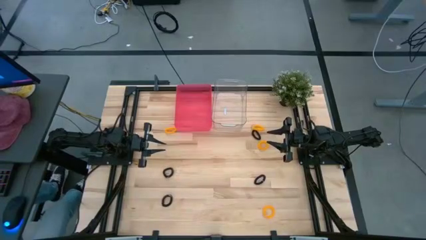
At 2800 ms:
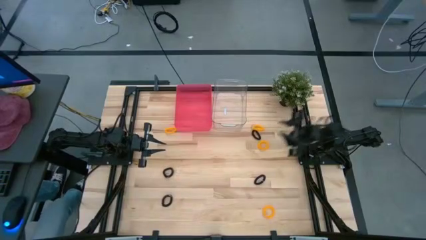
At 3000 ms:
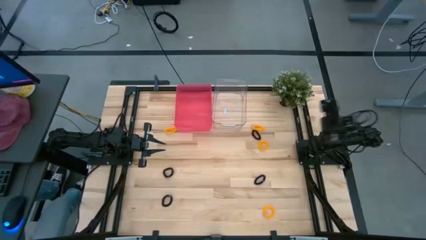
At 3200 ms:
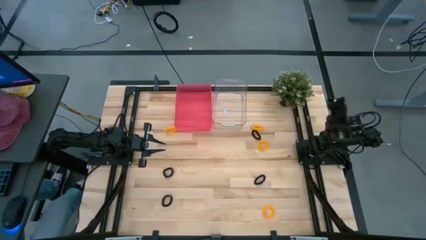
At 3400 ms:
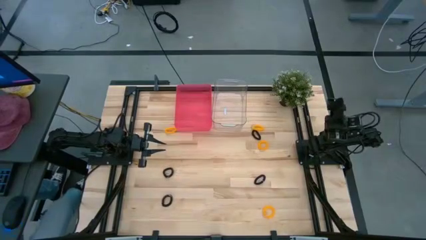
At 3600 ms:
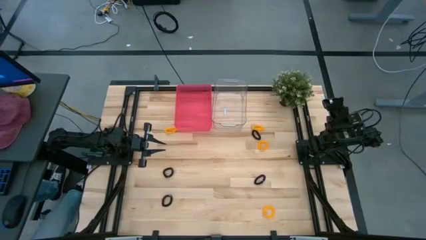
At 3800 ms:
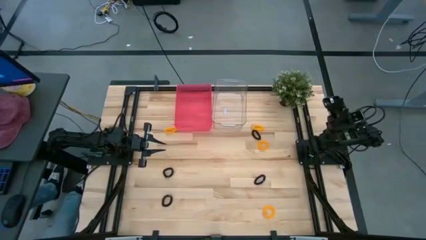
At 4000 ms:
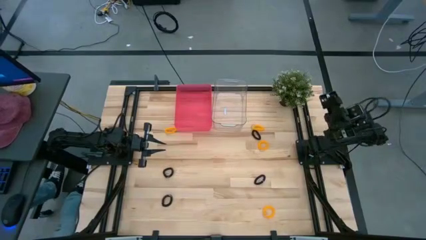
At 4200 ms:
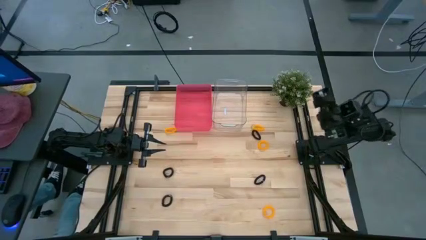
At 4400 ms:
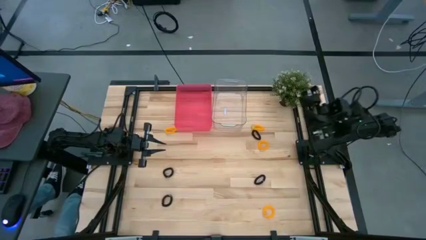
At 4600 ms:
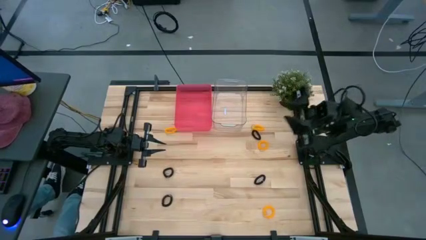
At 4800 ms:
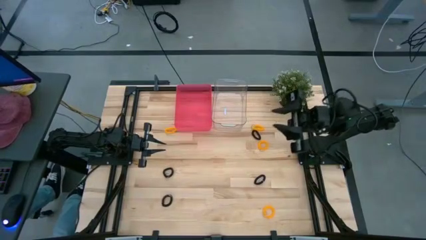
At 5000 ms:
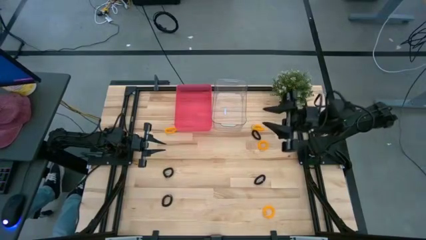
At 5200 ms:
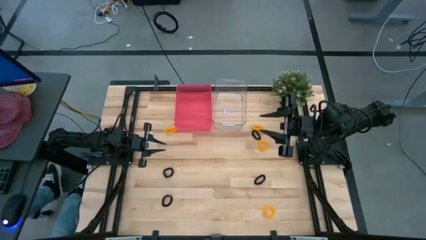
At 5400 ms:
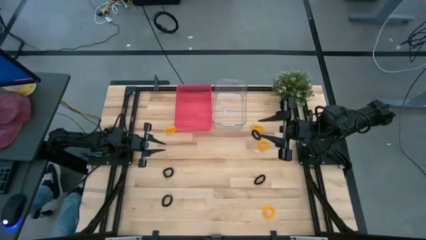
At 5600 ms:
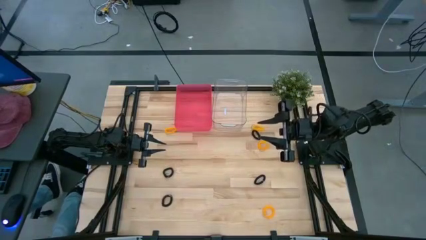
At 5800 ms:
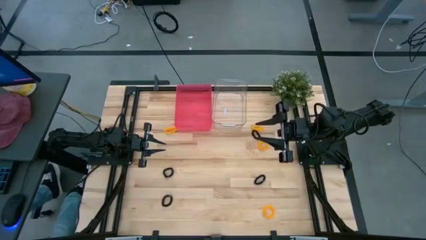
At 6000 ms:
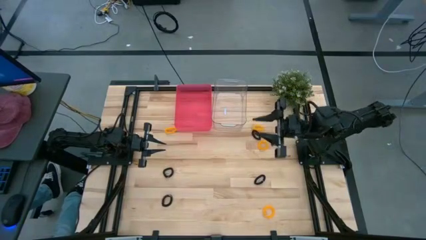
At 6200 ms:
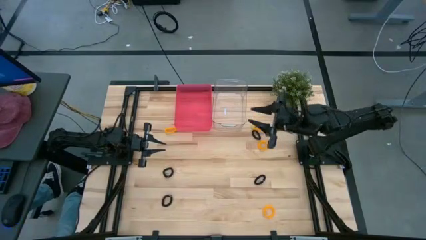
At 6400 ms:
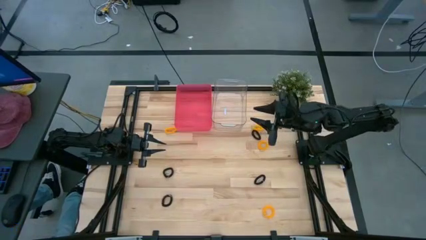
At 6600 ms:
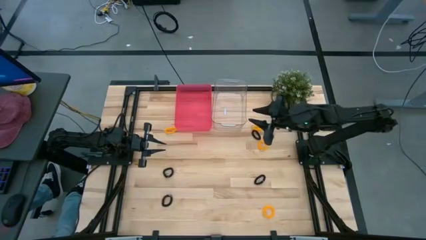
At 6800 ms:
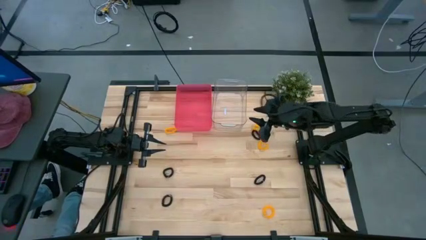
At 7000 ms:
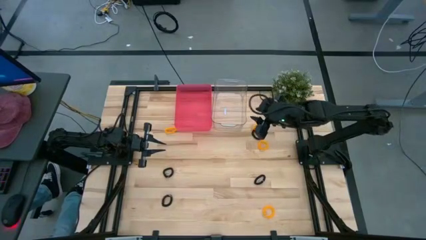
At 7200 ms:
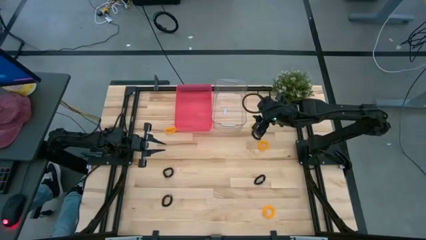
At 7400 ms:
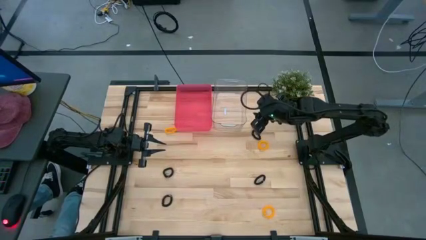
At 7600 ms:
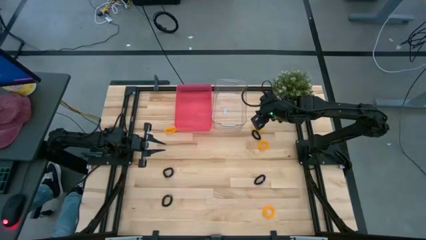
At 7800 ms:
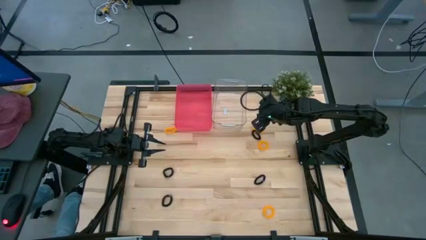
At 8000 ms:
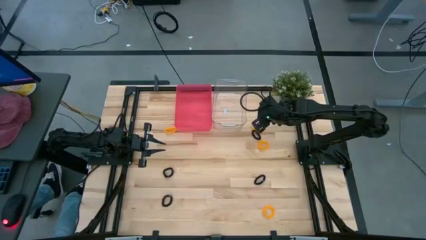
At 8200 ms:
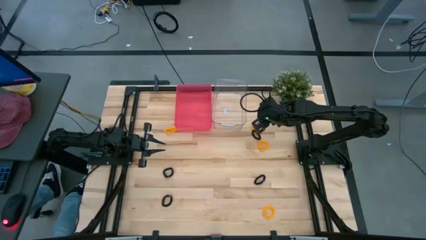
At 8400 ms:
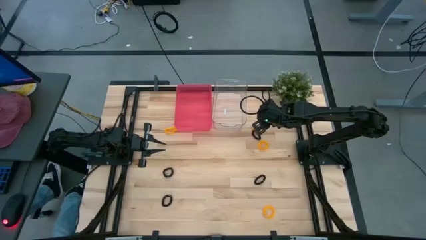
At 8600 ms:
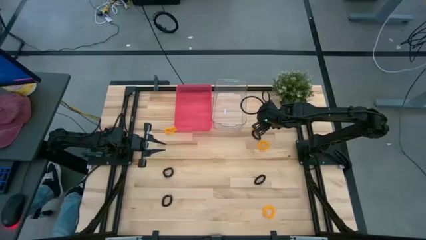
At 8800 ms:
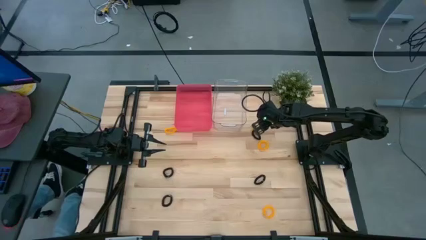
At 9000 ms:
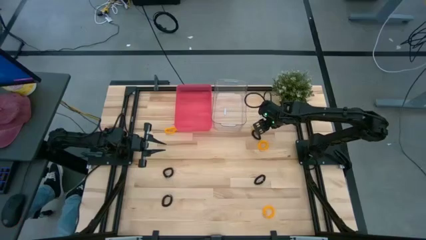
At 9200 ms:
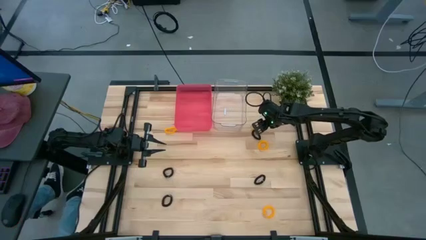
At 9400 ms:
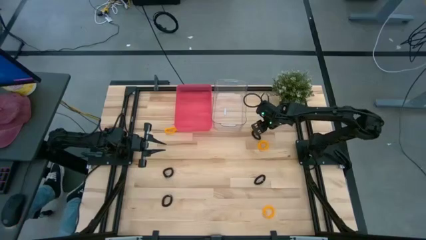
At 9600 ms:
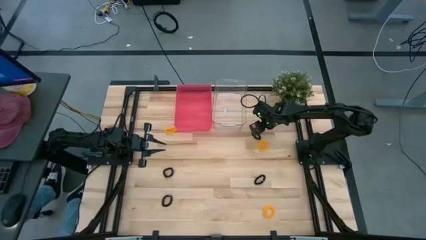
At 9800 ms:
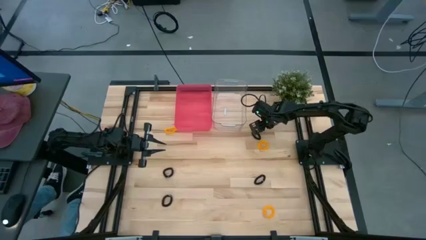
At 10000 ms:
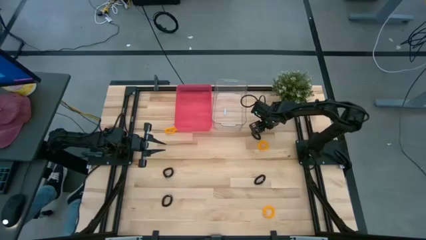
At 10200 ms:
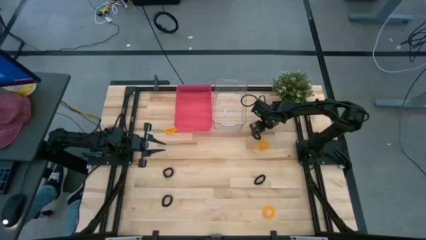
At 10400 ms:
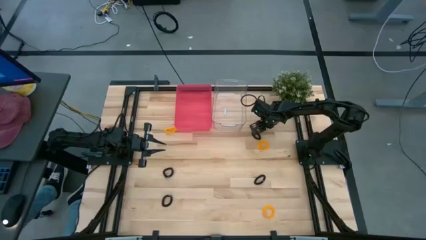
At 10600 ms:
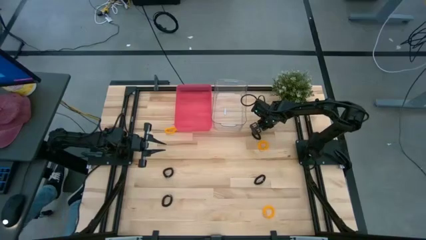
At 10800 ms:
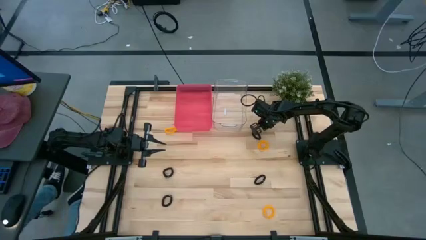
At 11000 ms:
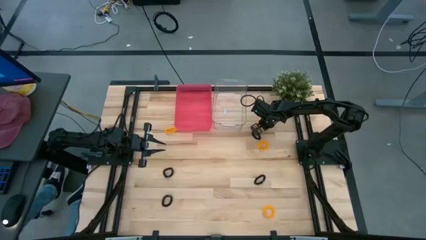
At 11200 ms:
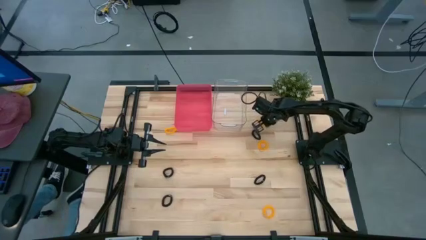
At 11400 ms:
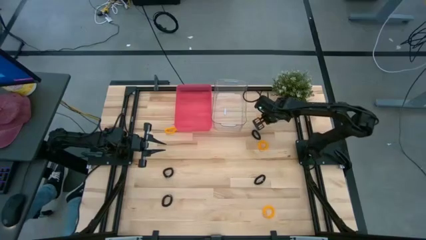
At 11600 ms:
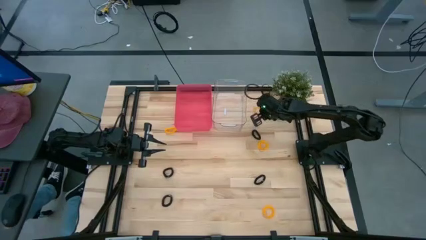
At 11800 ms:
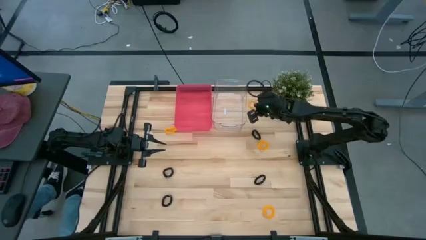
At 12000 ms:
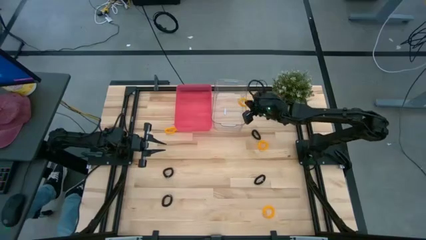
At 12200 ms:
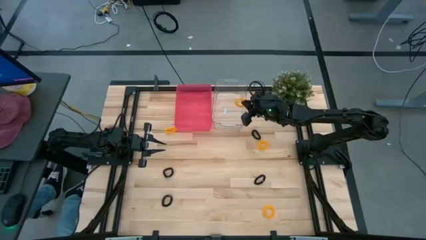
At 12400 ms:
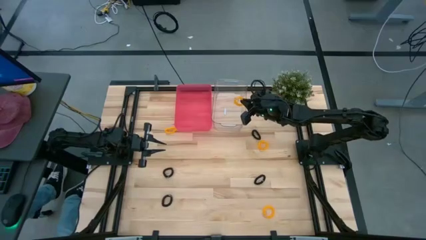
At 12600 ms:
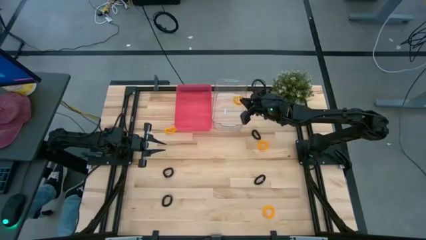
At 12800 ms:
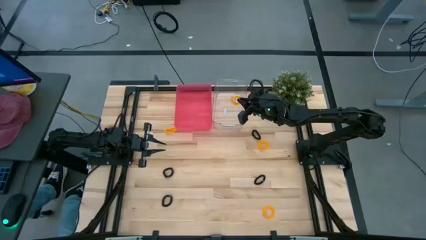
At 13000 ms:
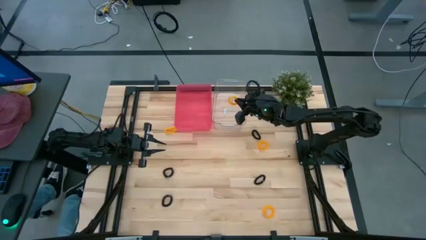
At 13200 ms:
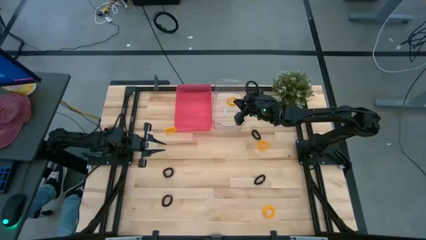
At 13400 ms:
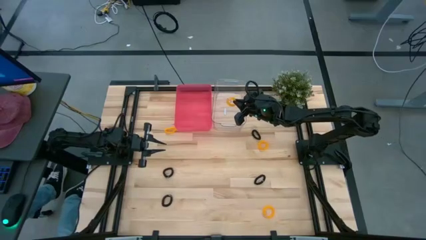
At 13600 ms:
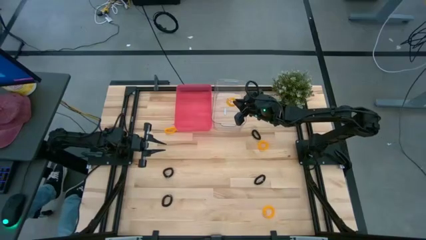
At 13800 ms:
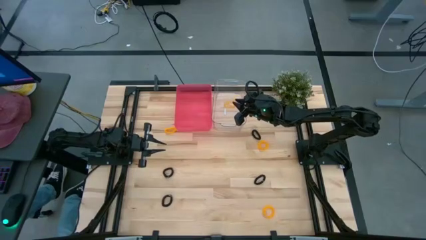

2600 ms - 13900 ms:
Task: Sort spring keychains
Put the yellow spring keychain into the transparent bin

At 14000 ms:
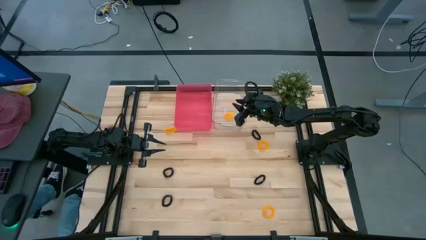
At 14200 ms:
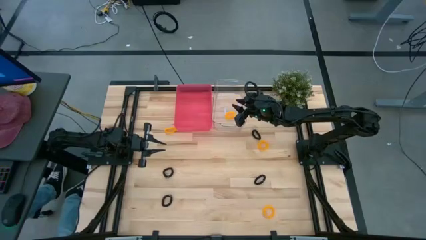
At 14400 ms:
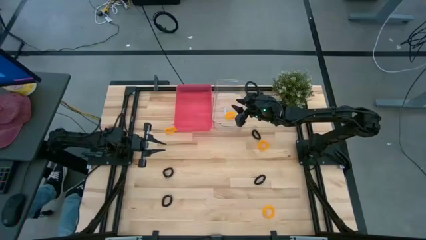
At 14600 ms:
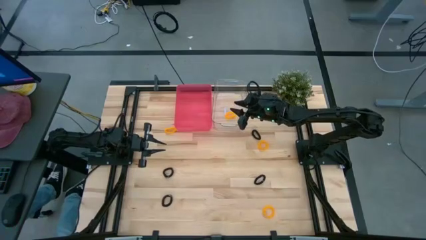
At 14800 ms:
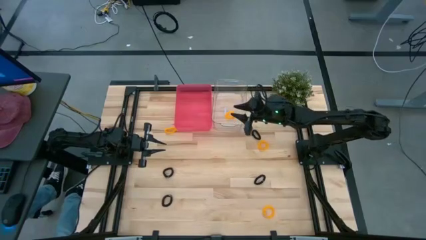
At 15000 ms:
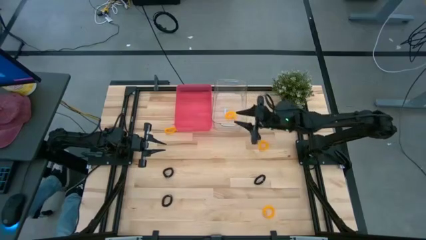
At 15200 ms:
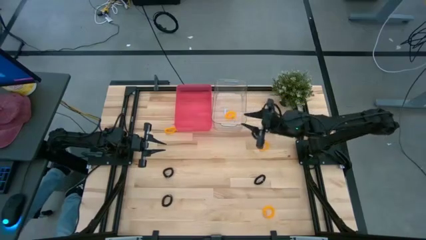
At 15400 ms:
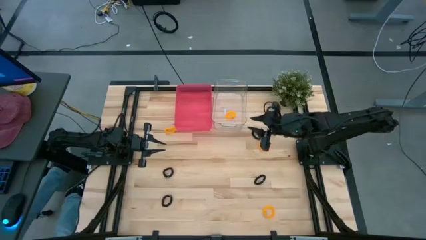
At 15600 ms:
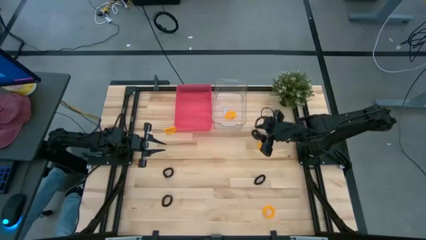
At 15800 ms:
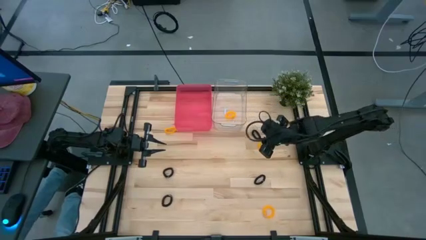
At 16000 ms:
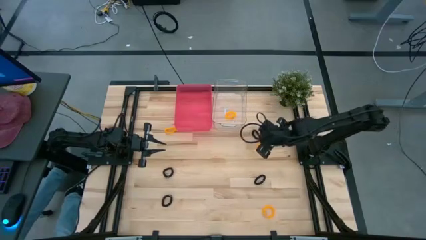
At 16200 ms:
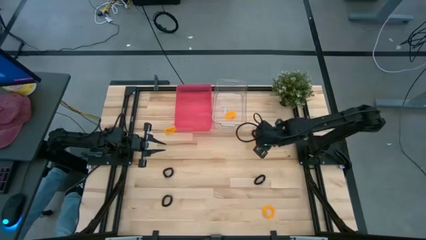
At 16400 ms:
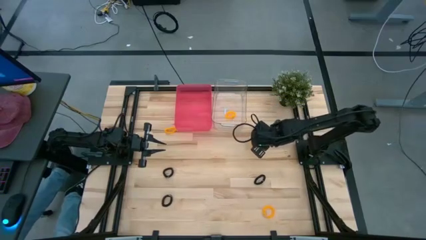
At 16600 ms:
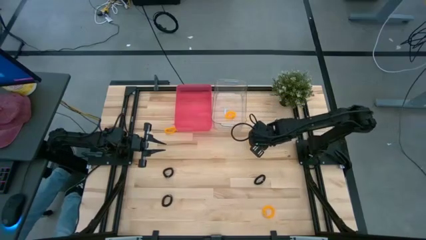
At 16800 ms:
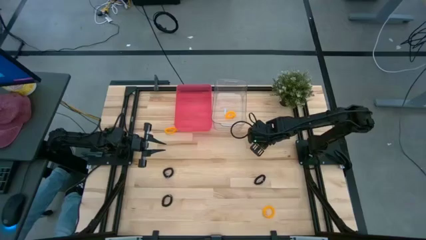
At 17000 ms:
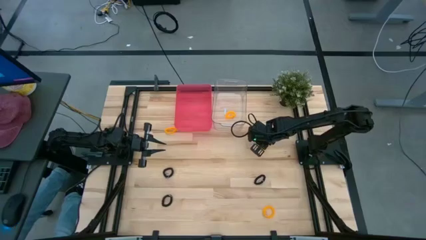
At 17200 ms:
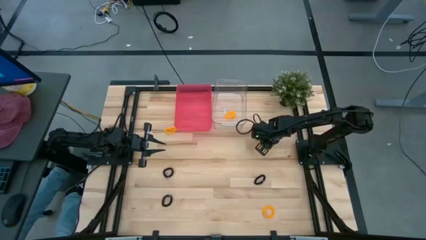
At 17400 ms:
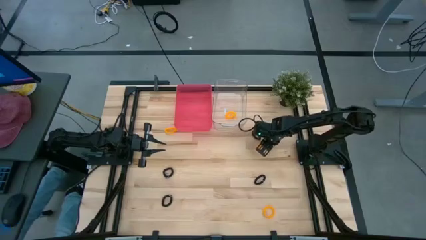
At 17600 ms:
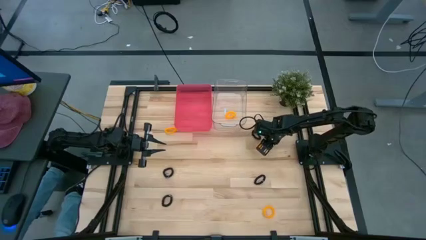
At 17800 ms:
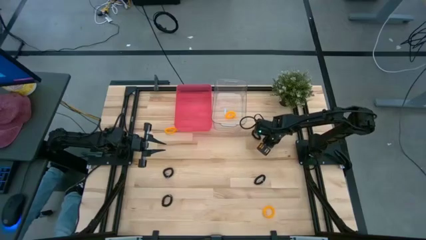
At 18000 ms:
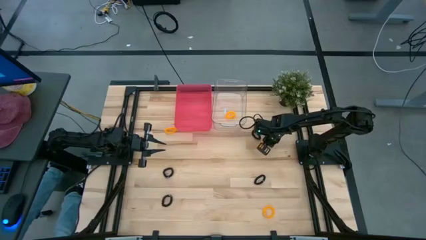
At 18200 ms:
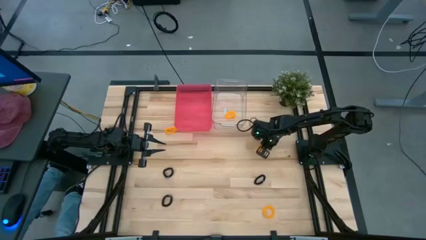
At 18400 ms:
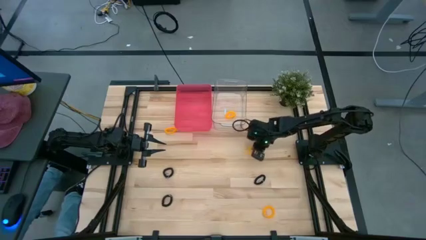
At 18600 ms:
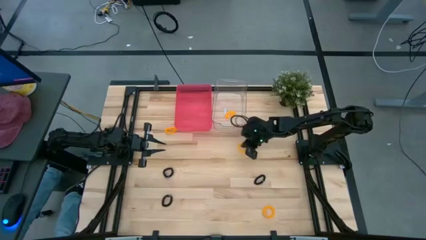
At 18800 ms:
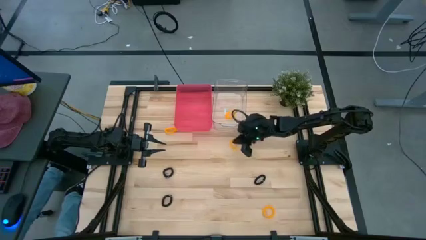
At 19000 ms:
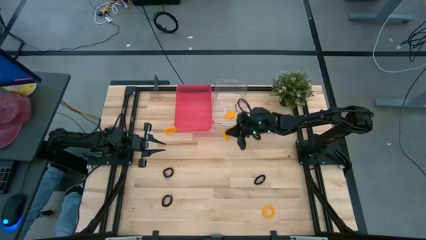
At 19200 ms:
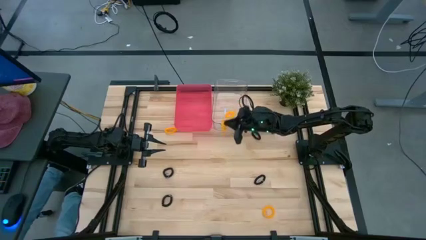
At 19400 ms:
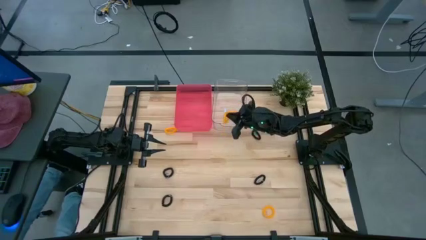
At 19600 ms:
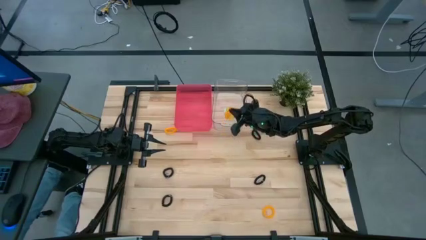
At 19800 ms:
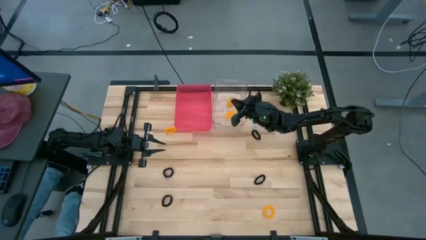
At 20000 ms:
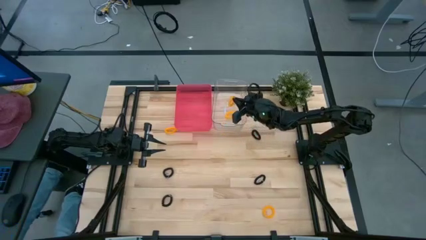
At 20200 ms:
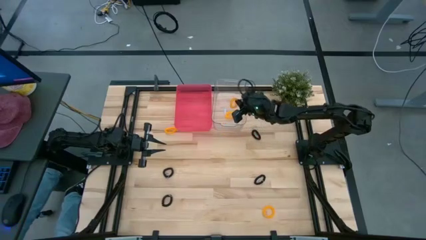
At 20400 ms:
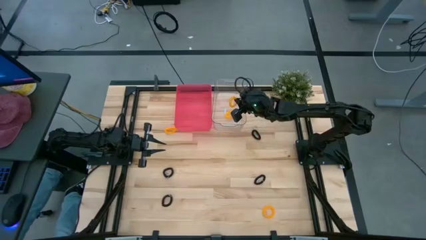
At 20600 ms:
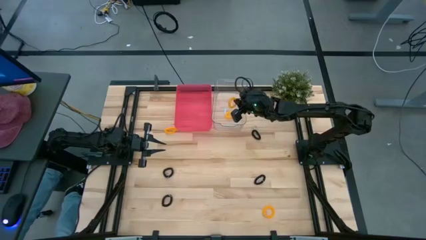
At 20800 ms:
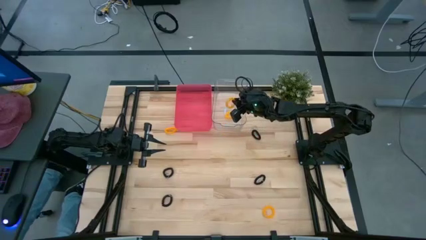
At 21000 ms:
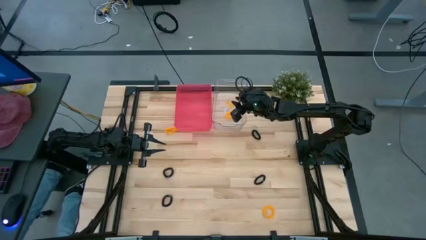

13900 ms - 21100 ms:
Put the orange spring keychain into the transparent bin
